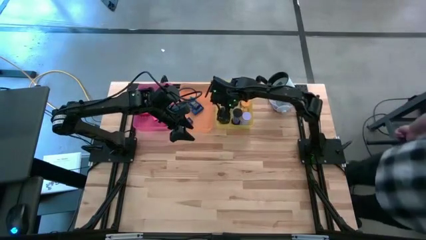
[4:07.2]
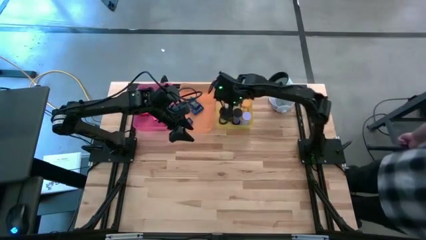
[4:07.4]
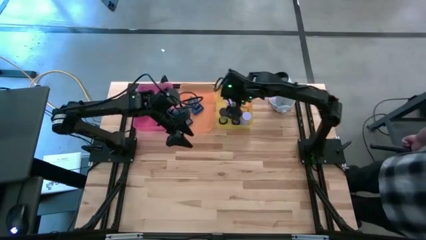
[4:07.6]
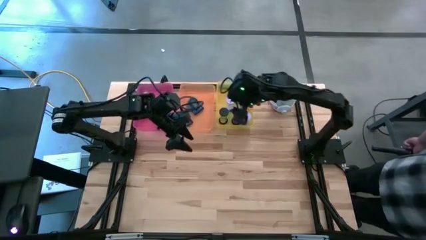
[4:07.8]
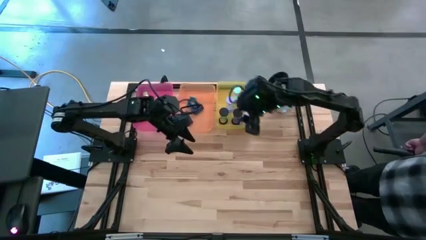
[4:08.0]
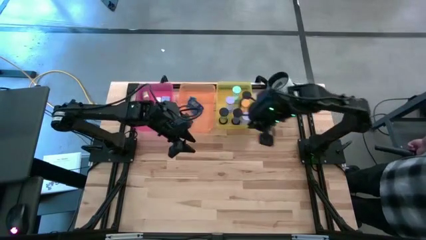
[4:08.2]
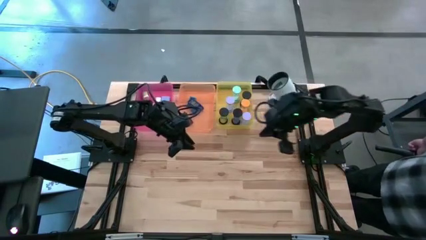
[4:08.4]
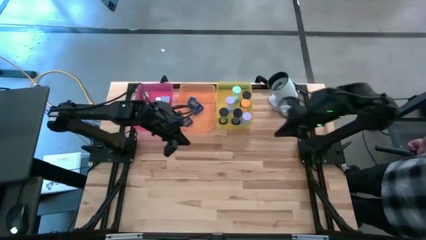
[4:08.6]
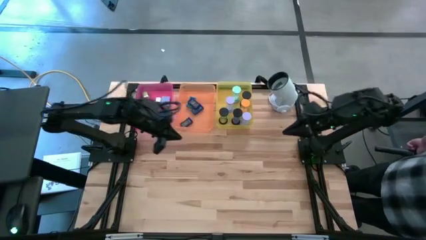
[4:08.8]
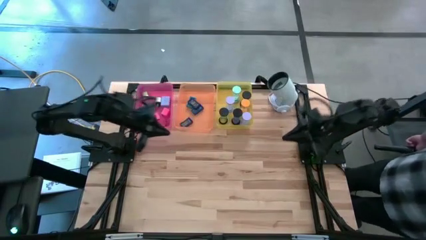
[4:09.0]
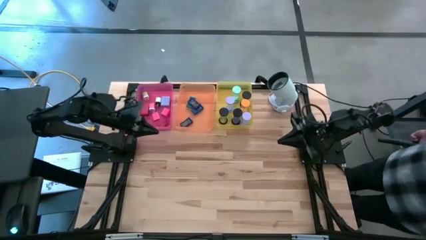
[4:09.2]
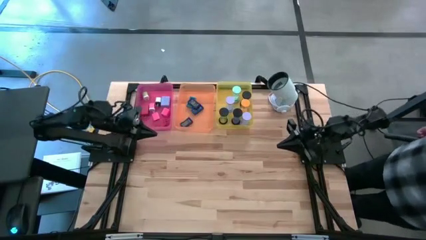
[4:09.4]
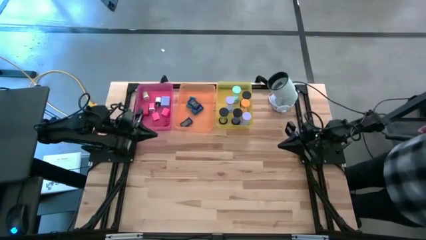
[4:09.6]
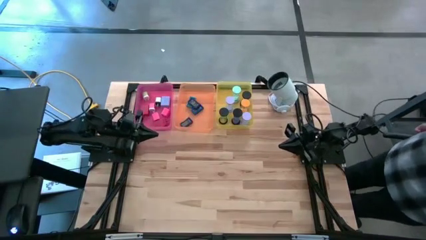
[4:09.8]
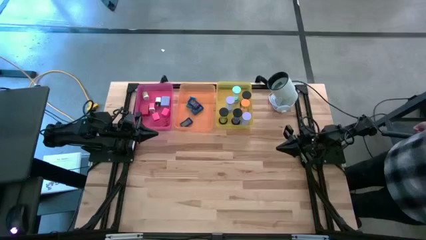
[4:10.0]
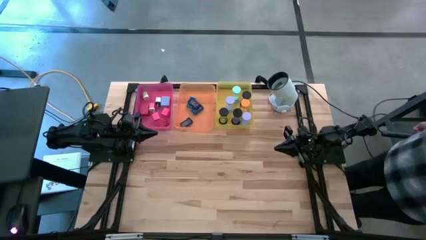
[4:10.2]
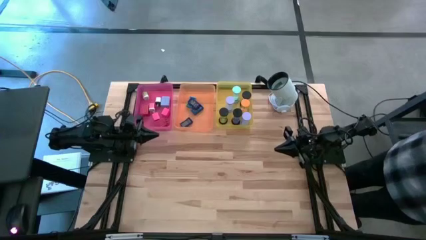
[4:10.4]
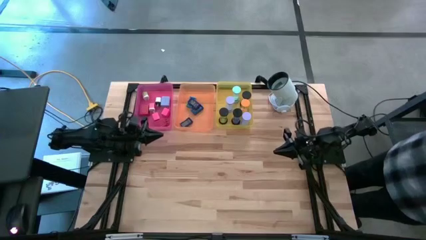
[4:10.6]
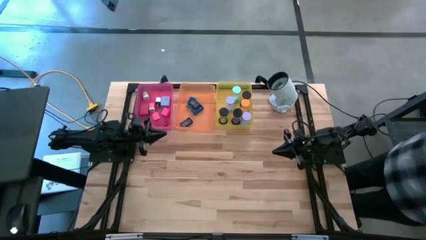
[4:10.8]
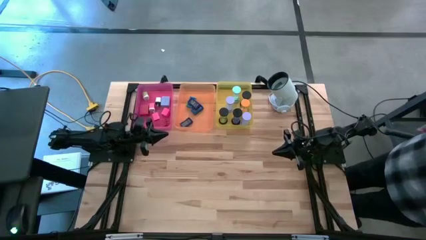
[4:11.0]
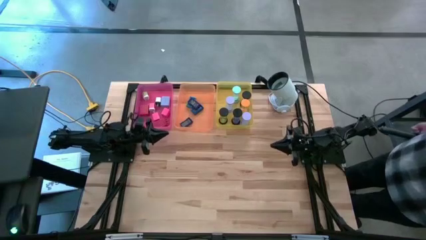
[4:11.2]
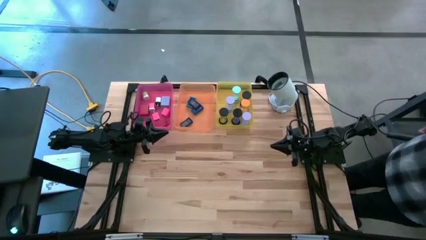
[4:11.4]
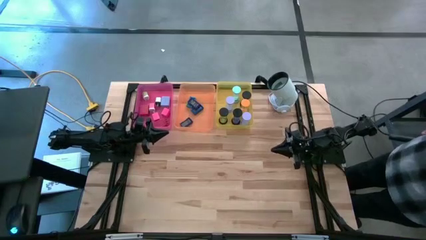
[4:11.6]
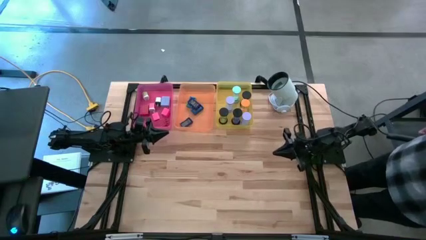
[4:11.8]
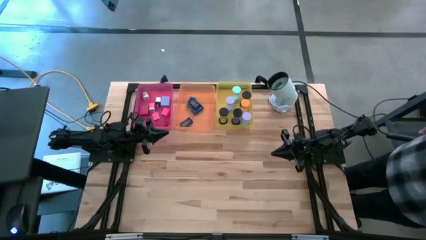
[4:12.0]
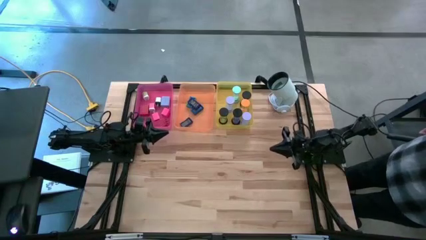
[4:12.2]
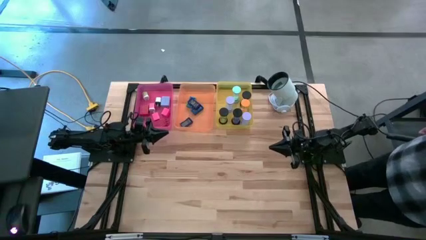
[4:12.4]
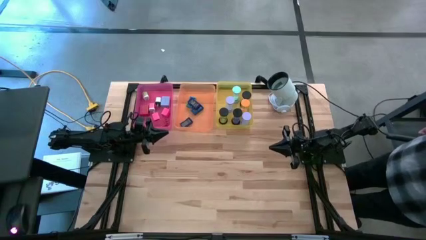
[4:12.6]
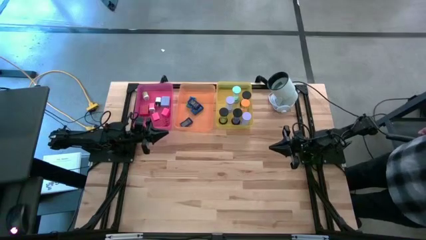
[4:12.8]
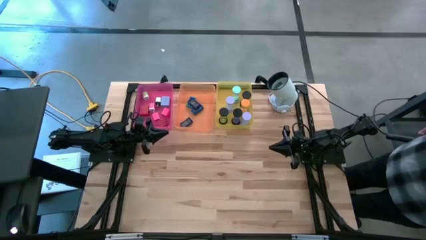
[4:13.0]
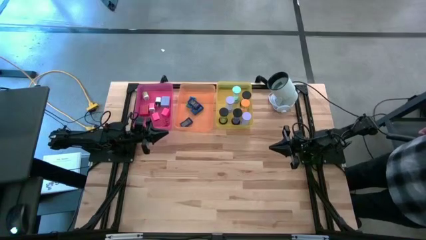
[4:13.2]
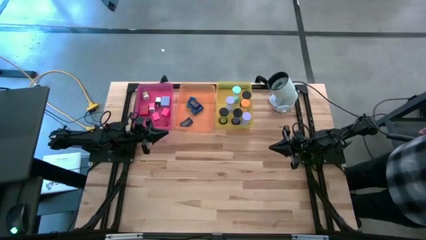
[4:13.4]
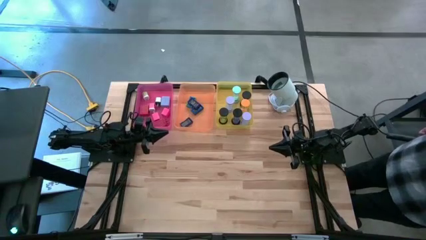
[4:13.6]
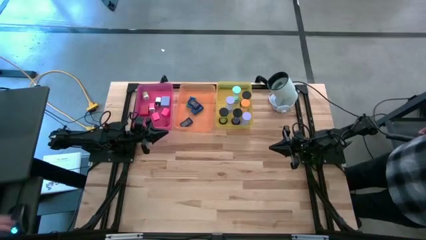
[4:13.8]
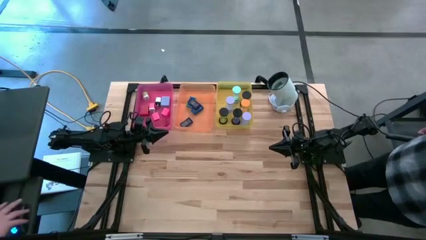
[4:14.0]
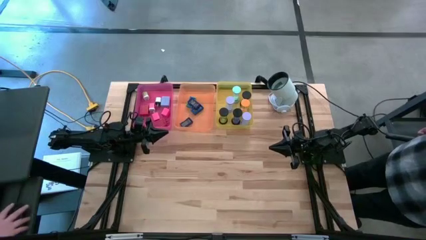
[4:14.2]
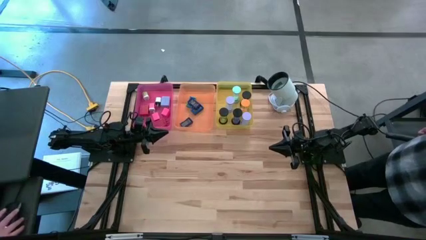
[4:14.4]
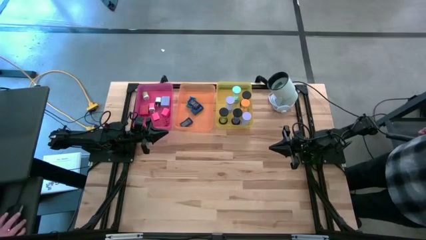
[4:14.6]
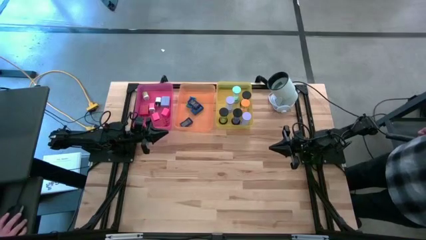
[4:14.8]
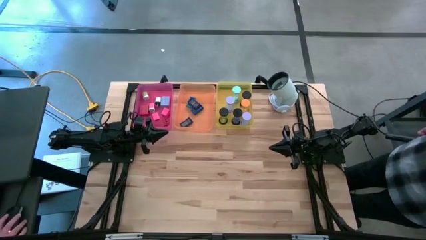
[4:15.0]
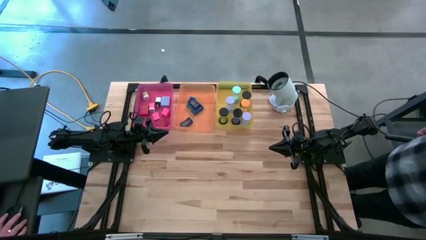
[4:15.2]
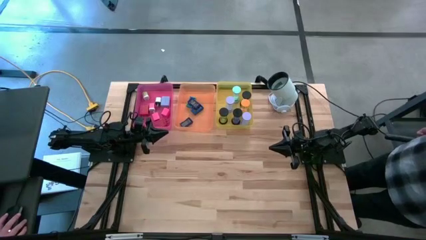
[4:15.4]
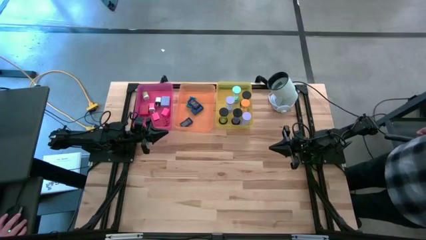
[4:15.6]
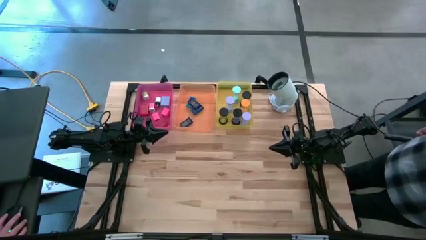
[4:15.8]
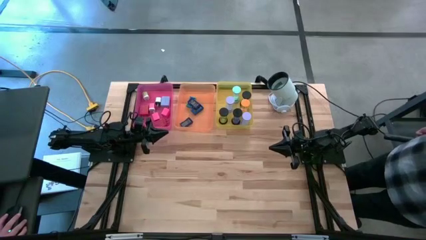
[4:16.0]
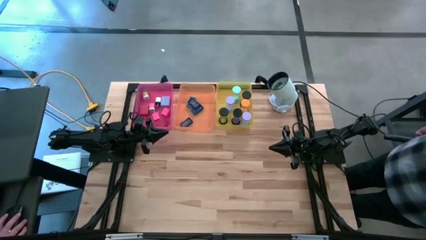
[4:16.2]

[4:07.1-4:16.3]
Task: Pick & Place Office items
Return to Home Position

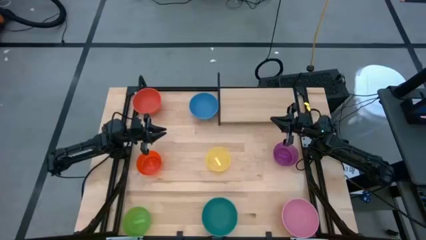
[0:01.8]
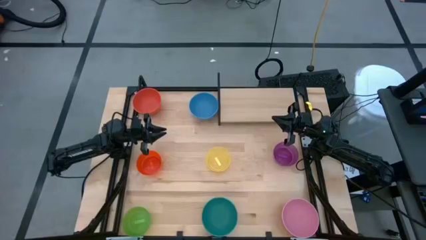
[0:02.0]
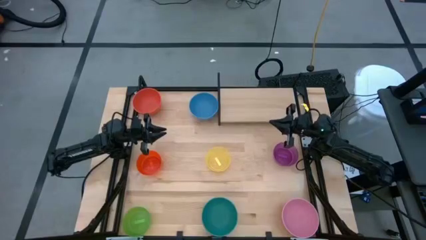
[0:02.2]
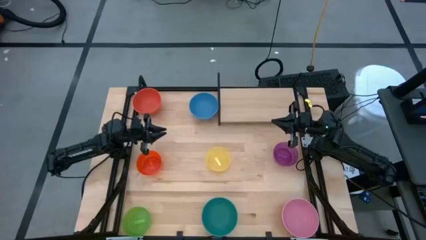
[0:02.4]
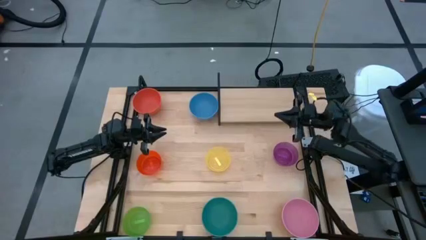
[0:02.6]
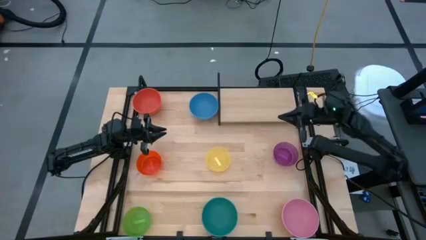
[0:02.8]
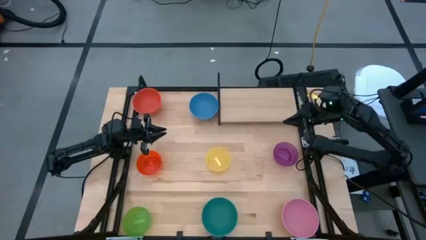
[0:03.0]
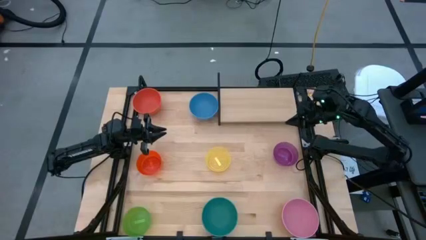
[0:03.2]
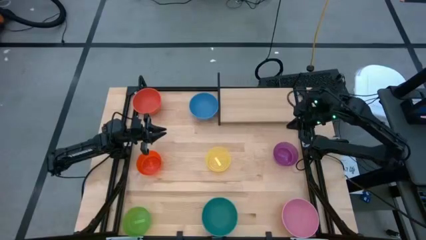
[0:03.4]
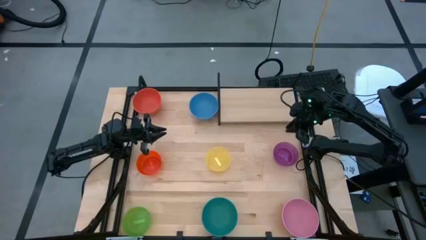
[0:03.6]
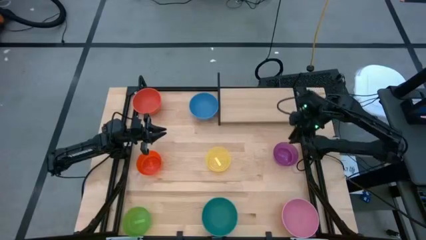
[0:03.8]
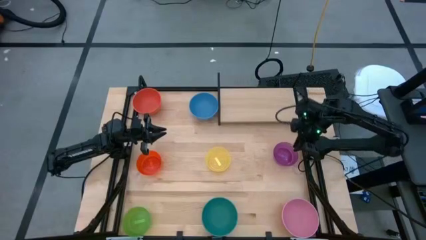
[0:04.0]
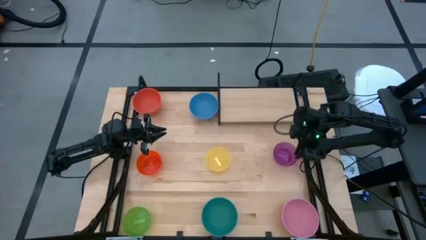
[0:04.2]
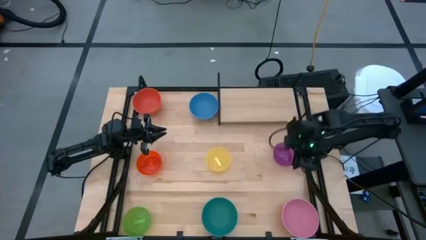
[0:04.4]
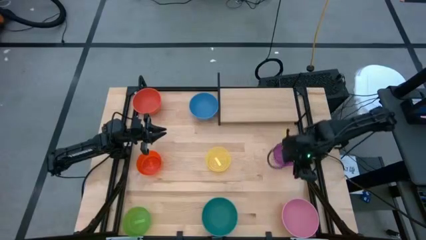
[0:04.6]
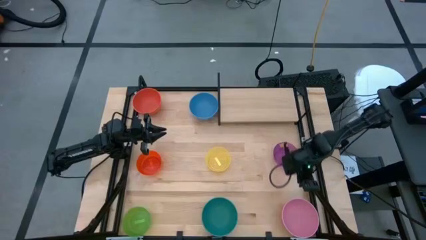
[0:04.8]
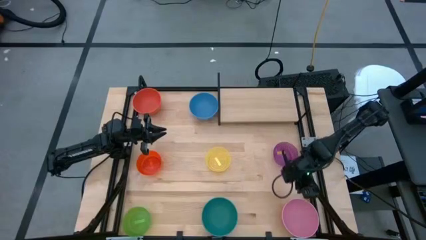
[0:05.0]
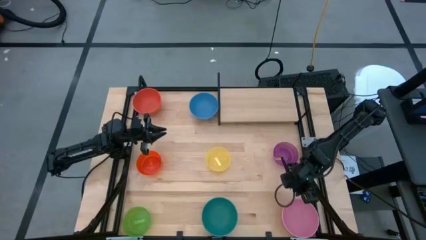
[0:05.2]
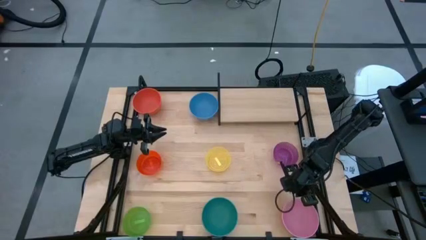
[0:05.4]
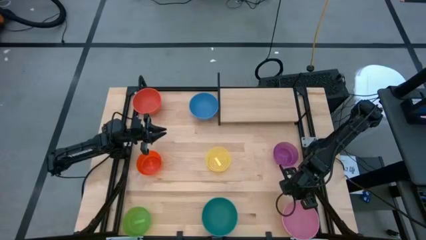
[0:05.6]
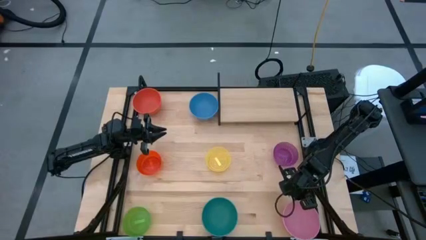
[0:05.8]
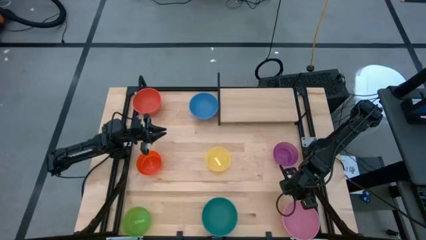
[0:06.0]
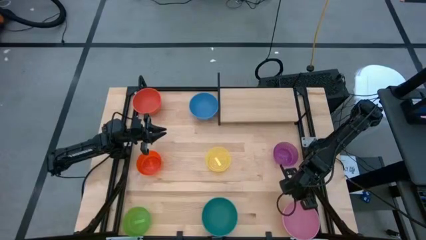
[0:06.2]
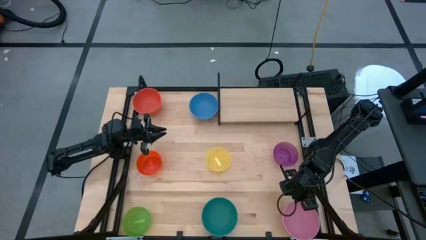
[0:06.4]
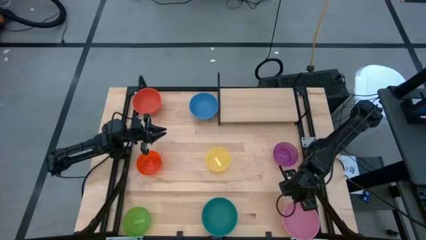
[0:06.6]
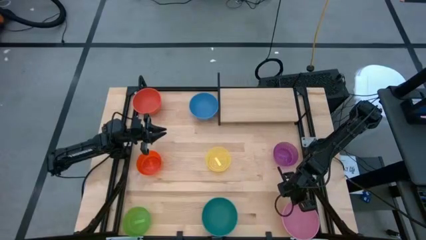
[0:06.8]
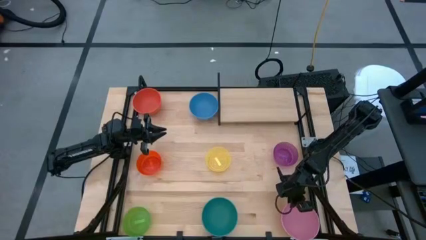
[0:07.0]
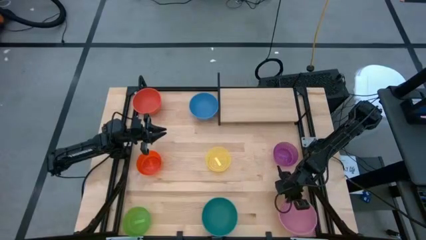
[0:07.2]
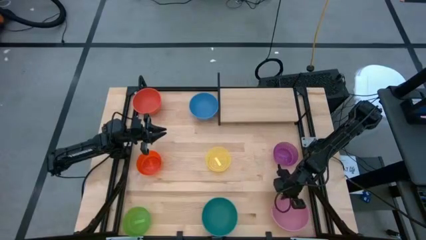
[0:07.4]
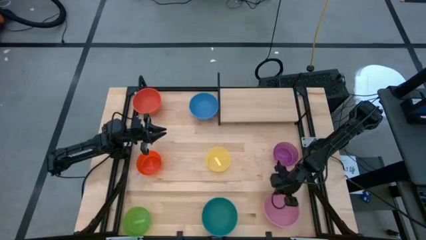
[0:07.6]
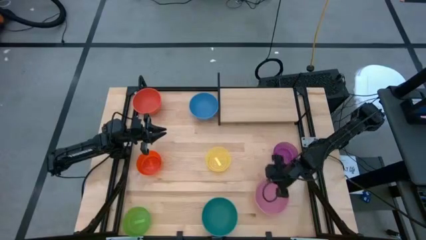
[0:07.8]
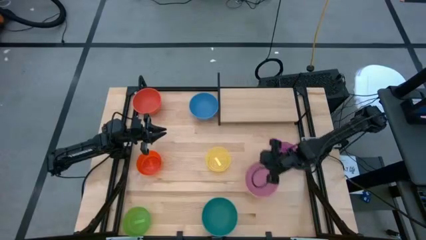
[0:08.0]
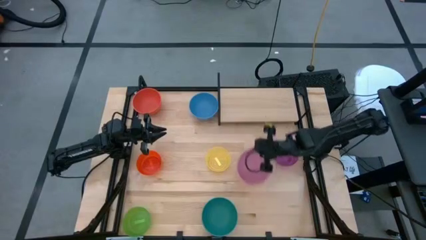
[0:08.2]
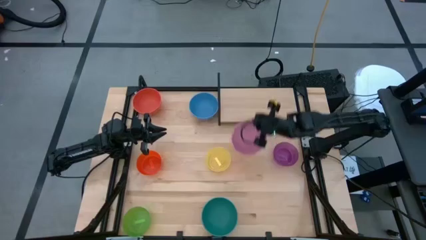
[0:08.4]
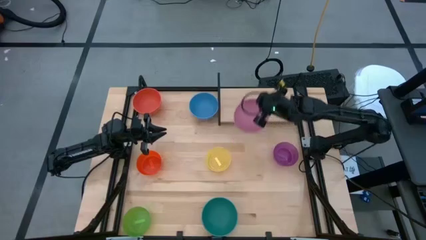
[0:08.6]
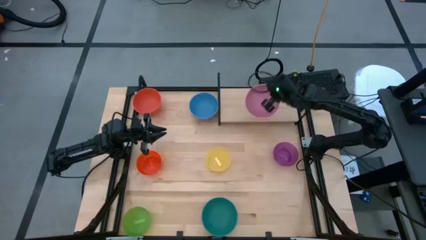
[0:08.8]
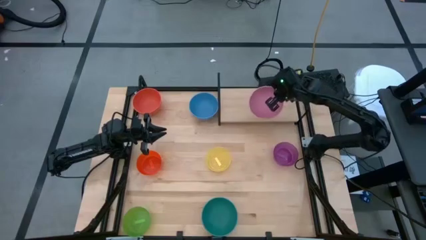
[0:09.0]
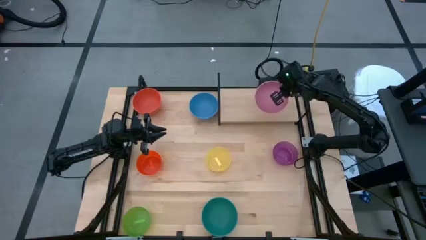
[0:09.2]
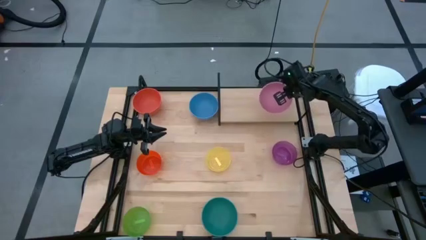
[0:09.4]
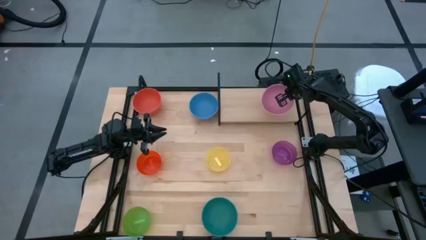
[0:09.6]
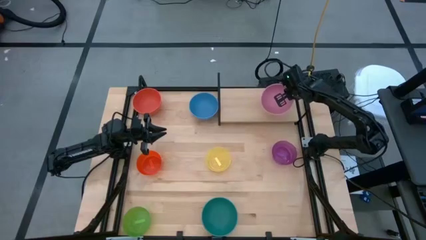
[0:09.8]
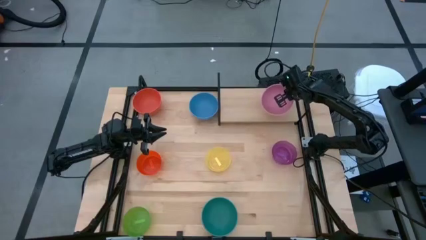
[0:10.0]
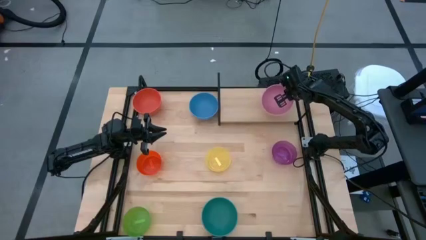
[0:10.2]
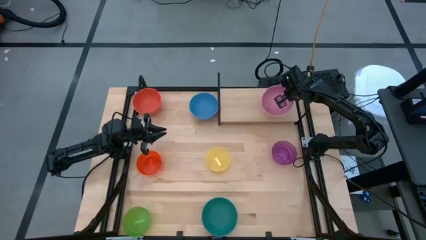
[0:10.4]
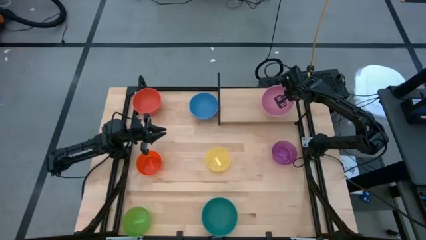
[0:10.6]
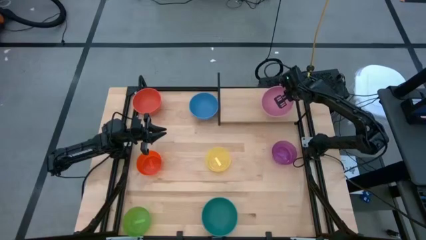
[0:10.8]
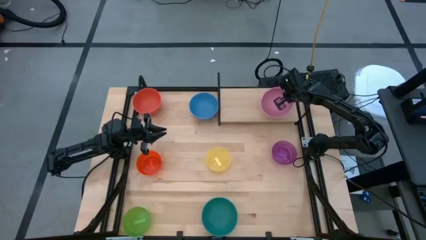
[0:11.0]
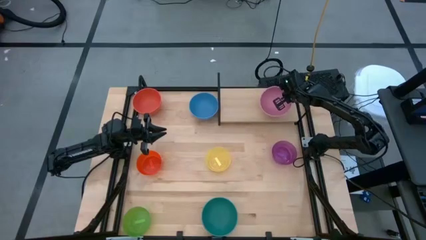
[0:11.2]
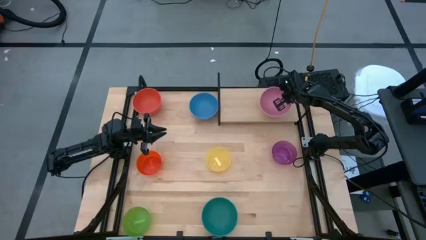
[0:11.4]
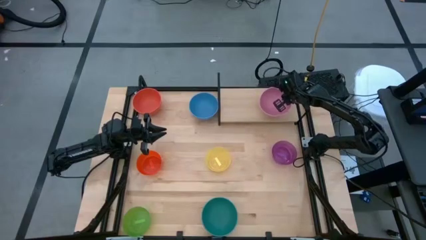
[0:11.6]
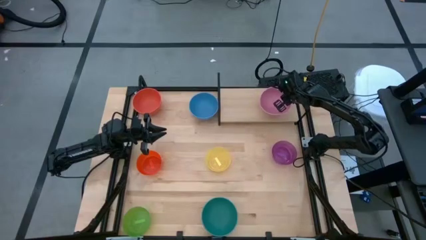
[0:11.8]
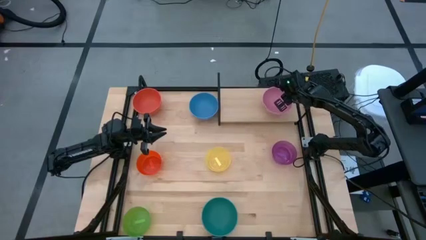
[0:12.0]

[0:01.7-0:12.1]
Task: Place and stack bowls onto a shelf
Put the pink bowl on the shelf
